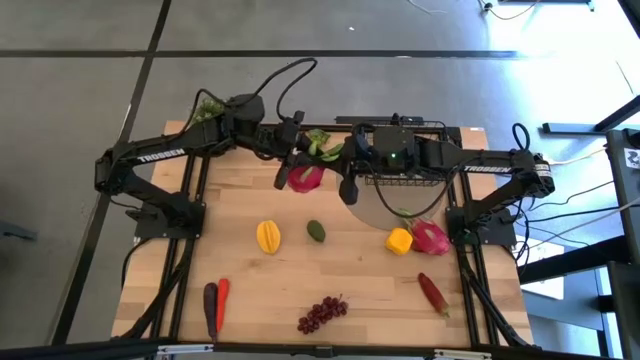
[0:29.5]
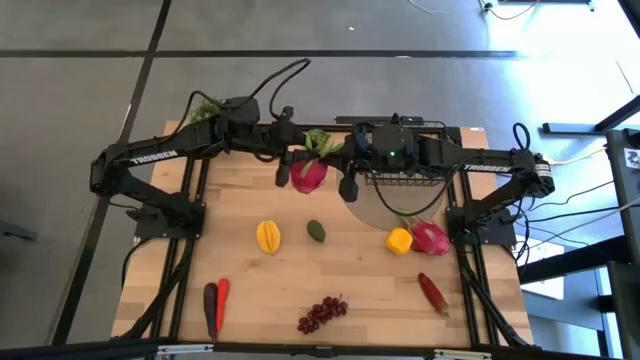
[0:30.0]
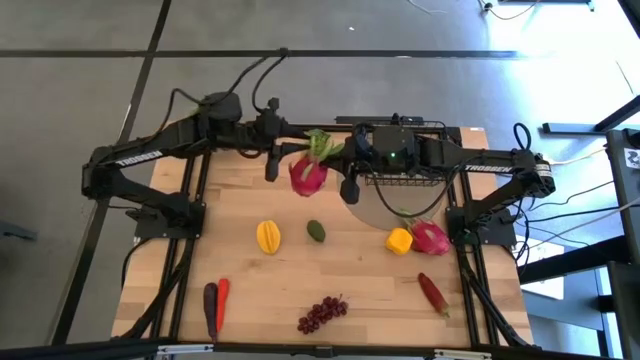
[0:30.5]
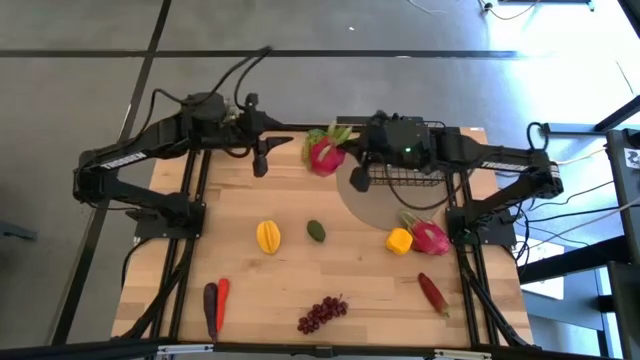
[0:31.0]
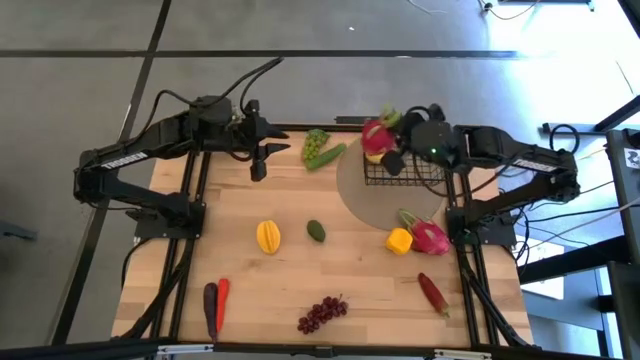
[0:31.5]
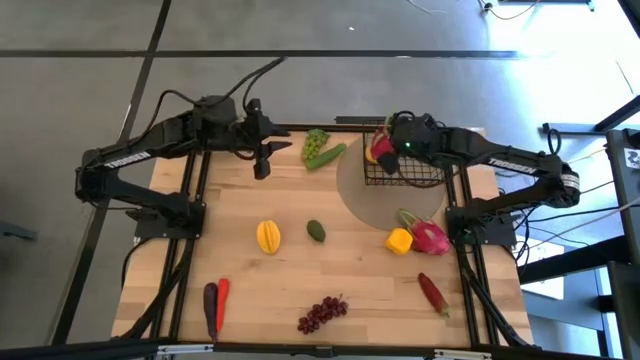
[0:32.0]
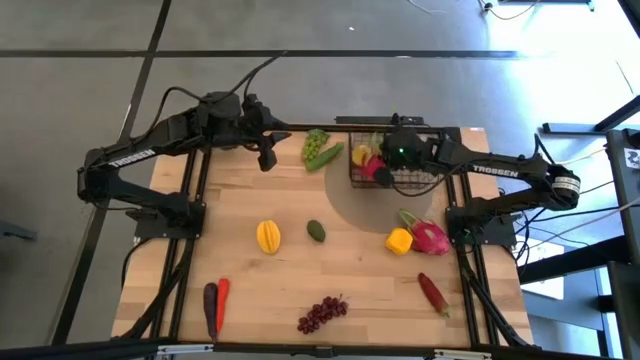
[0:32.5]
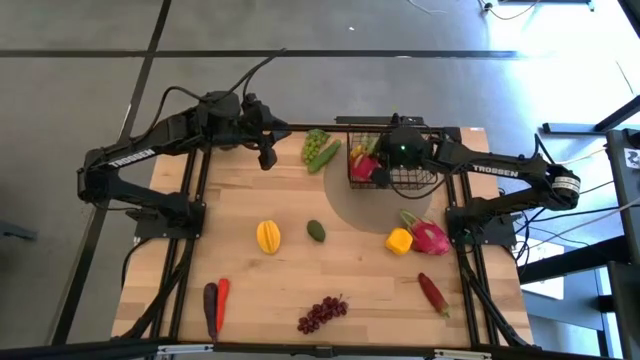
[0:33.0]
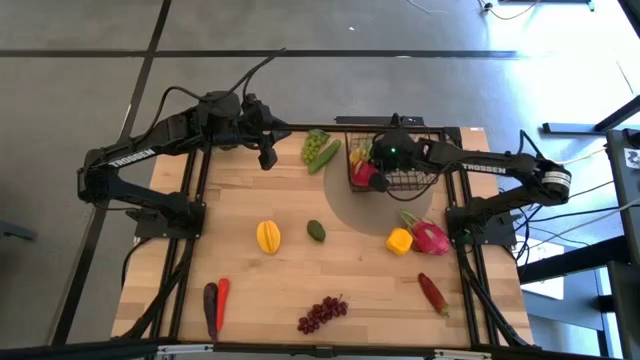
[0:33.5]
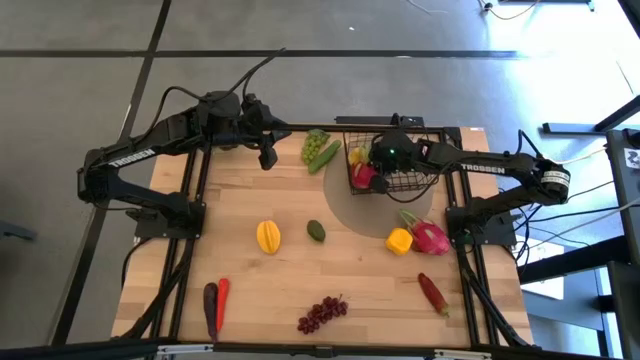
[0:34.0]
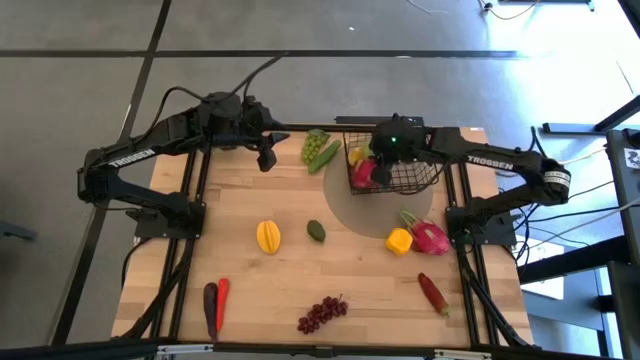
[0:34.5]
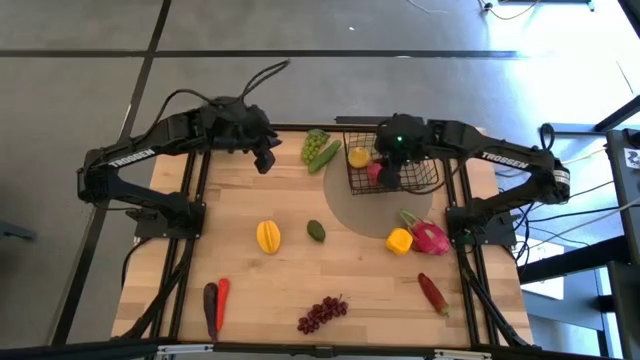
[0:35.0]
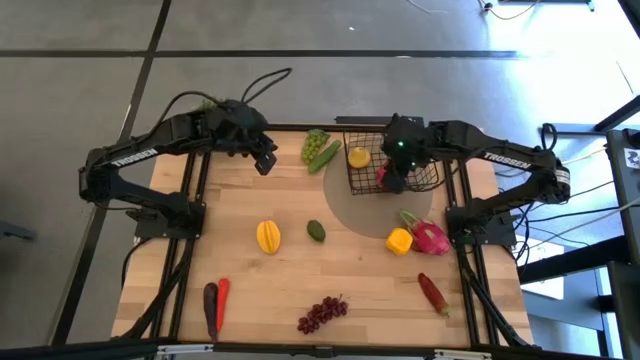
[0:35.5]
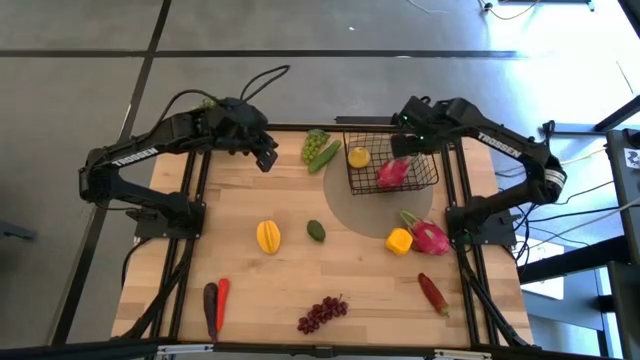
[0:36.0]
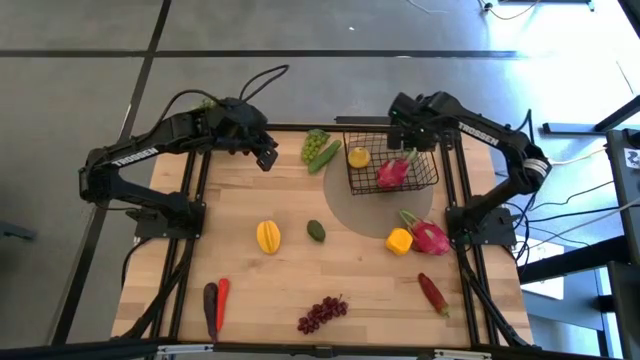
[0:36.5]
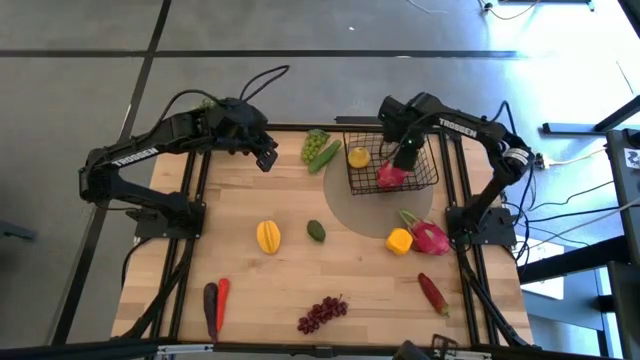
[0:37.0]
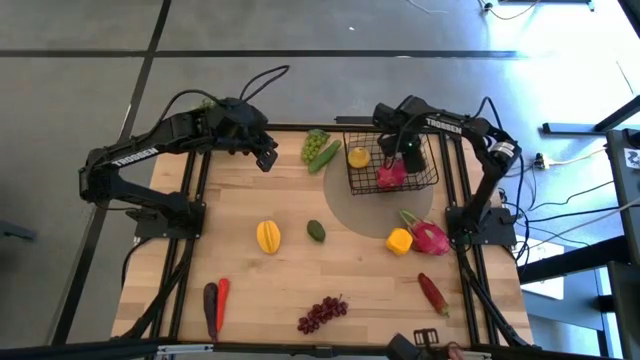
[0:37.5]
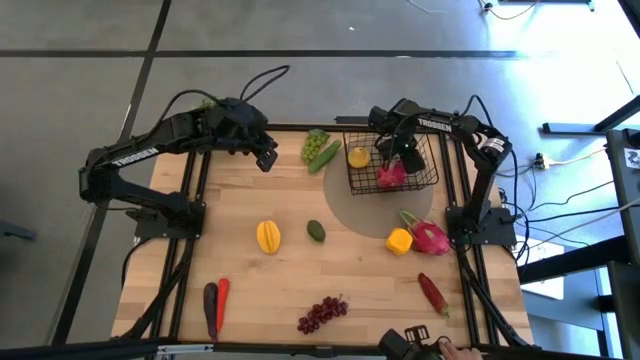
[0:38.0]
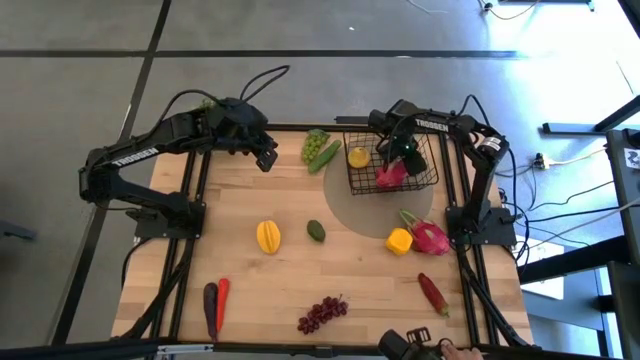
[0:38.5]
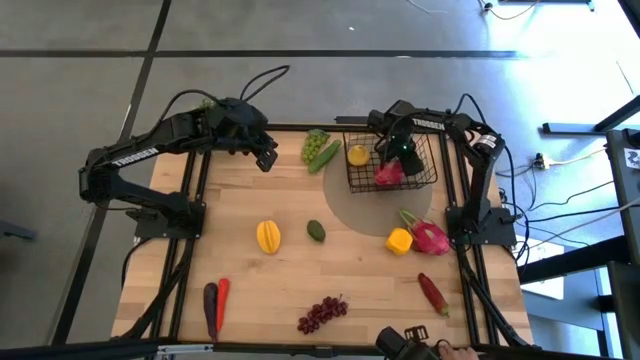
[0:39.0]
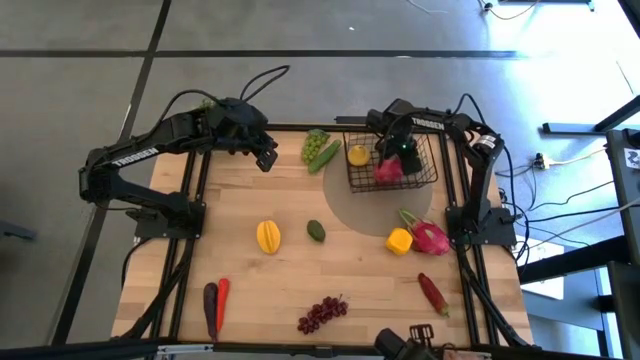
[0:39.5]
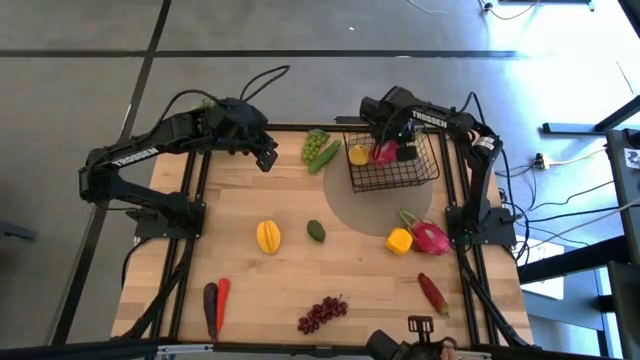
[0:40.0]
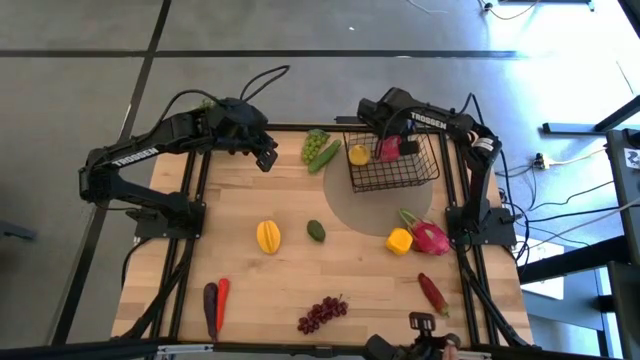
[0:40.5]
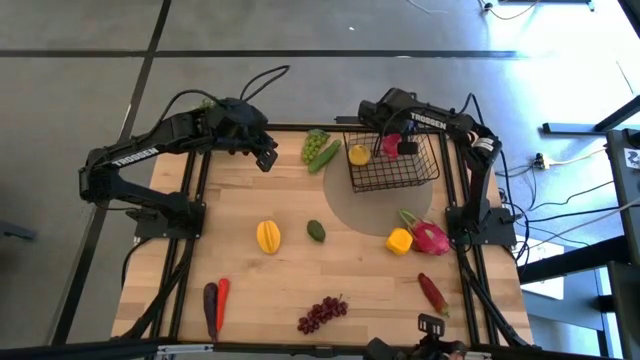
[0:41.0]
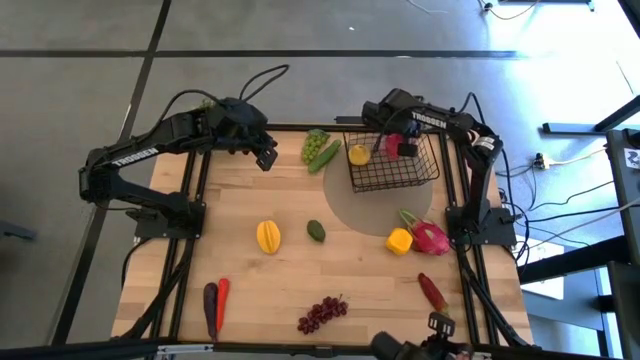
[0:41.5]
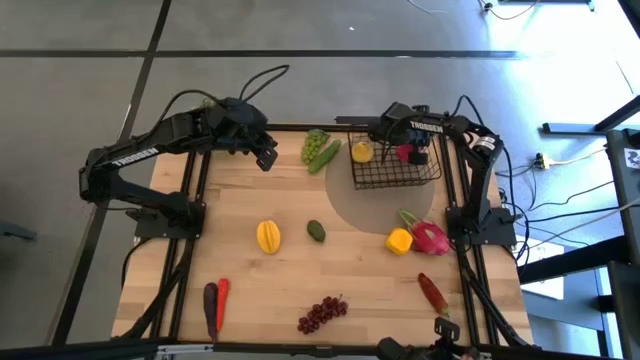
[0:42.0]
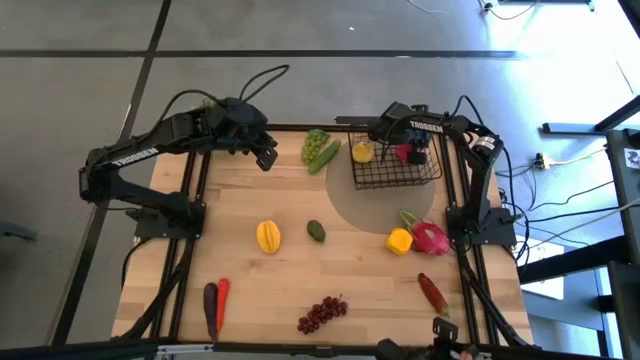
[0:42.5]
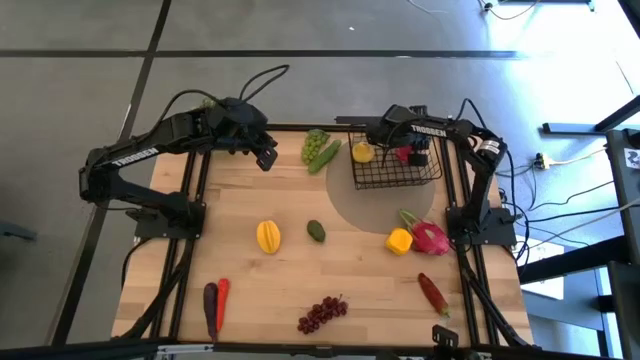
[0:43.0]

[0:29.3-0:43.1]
Task: Build produce basket
Put the left dragon fruit into the wire basket

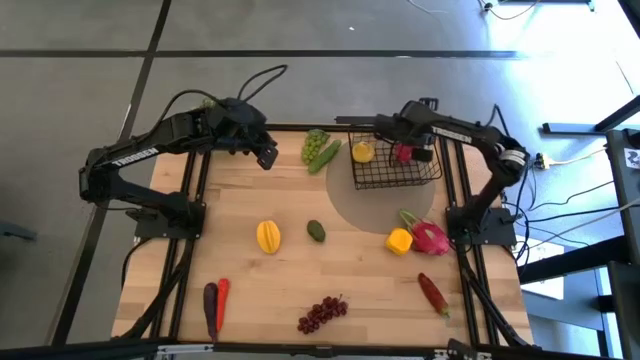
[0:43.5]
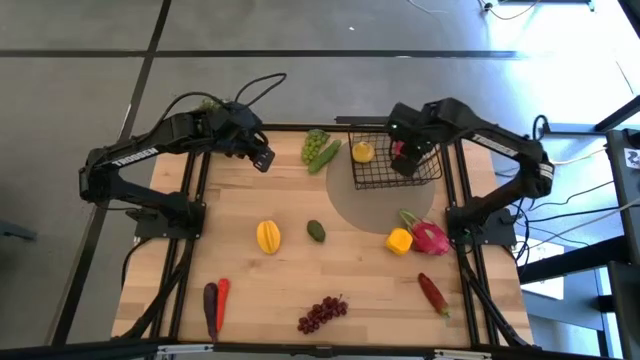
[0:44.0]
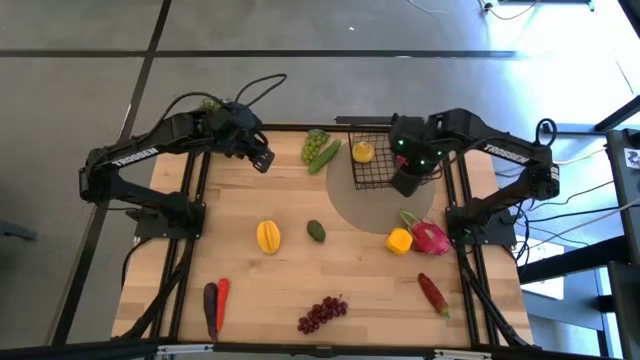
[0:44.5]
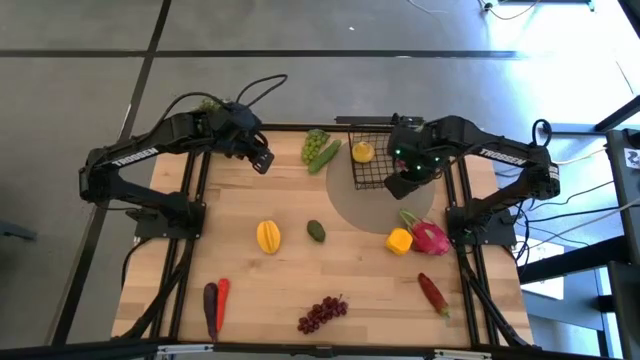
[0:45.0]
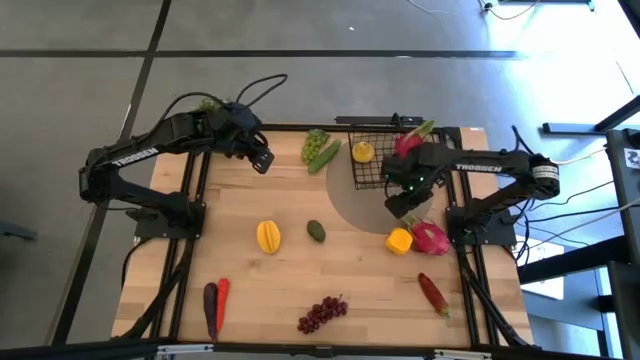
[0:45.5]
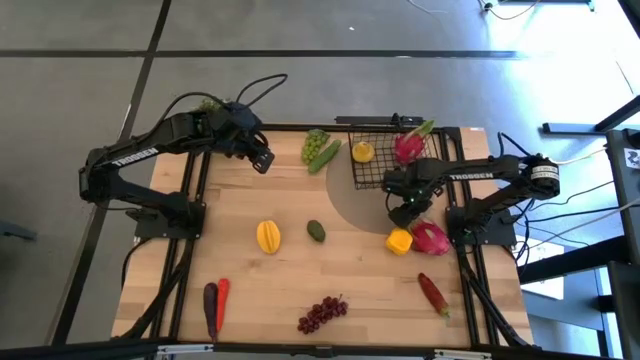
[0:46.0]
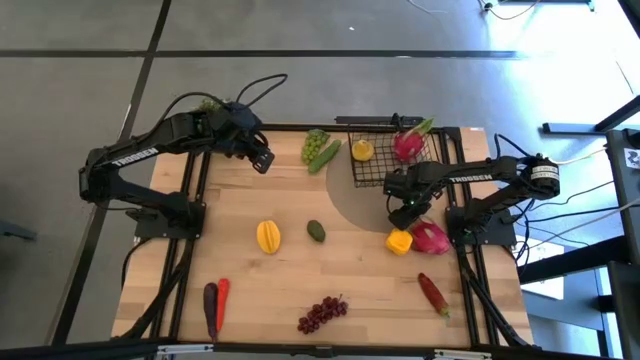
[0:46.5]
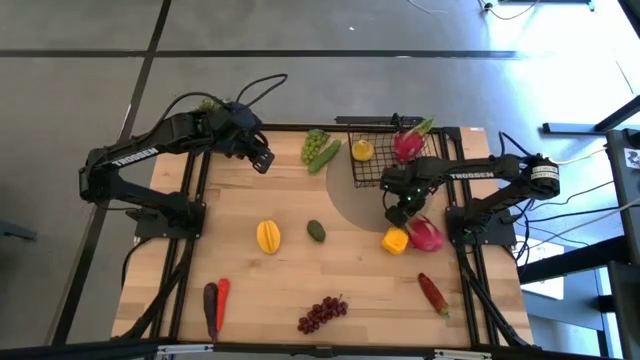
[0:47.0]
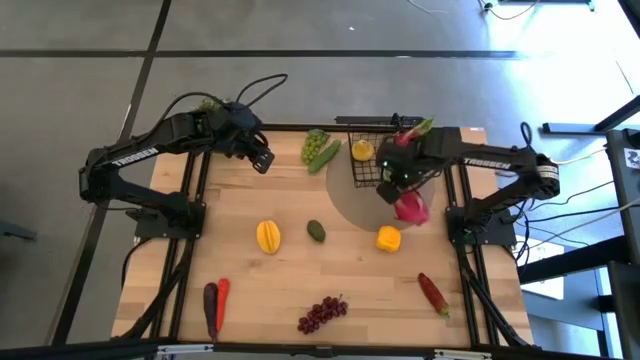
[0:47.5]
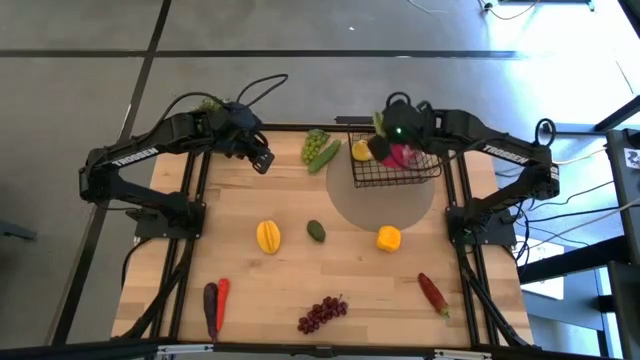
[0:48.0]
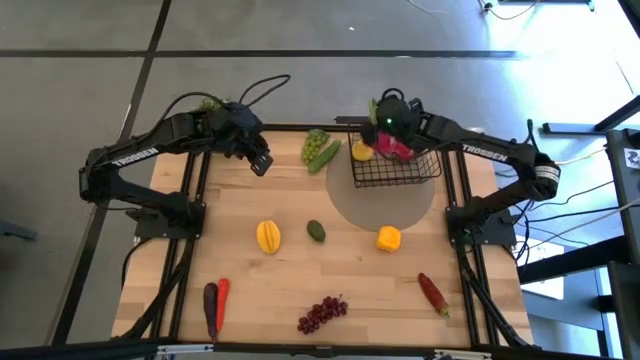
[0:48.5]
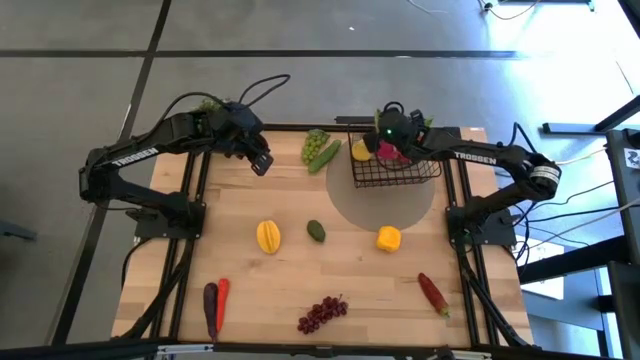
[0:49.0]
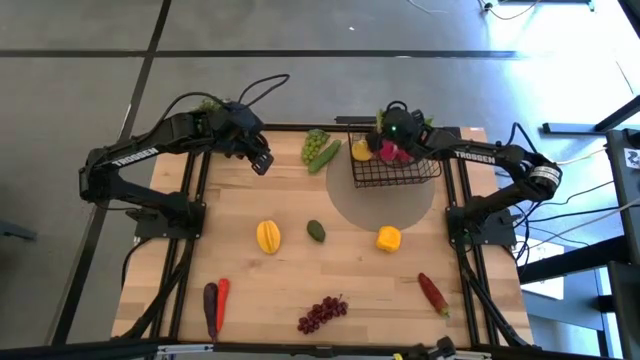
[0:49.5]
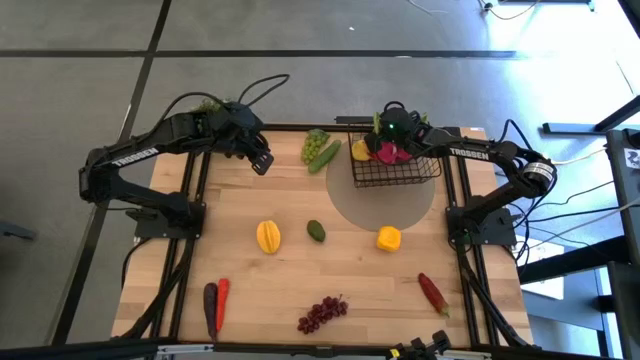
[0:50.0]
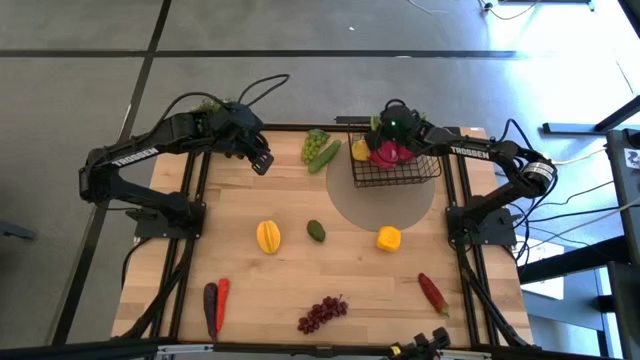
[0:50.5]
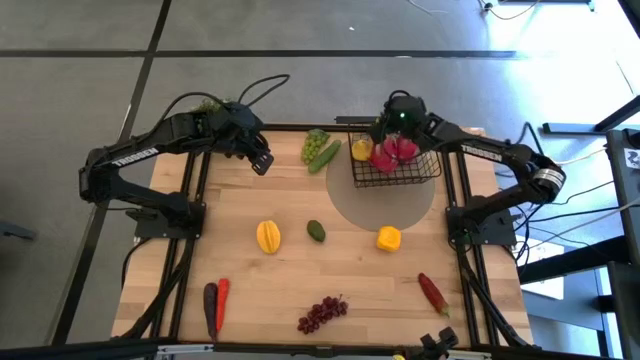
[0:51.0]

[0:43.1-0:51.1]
Put the dragon fruit into the wire basket
